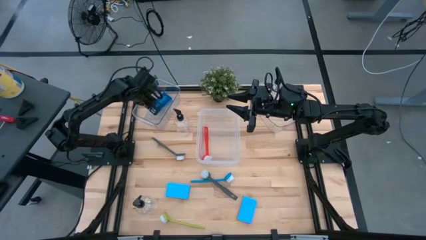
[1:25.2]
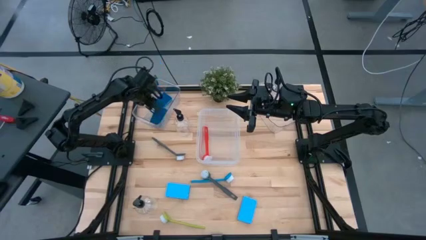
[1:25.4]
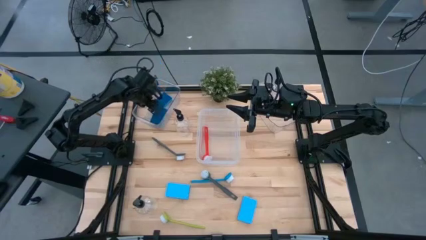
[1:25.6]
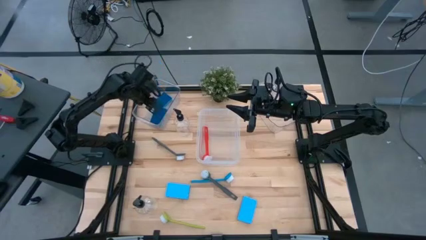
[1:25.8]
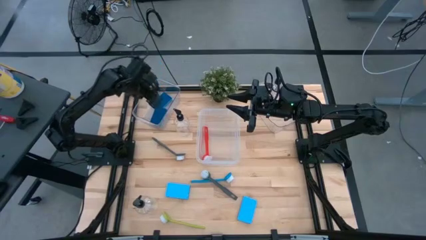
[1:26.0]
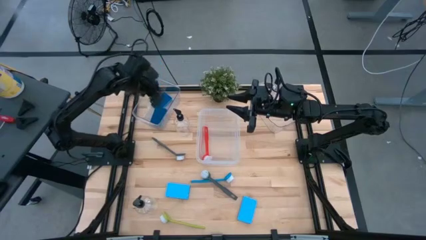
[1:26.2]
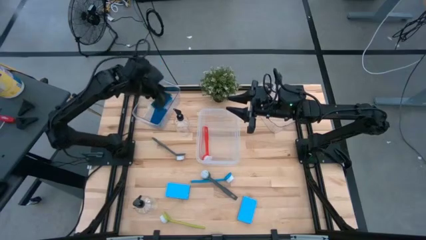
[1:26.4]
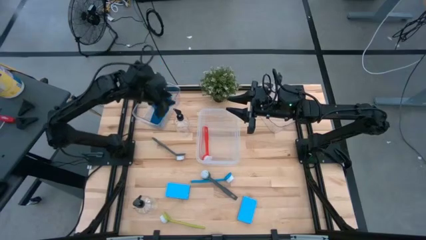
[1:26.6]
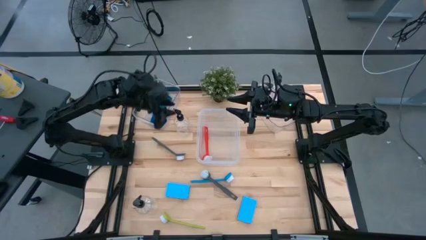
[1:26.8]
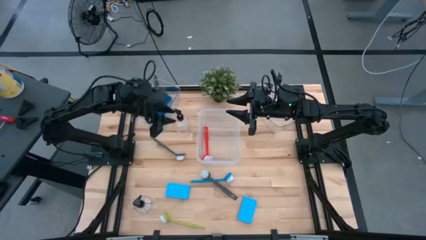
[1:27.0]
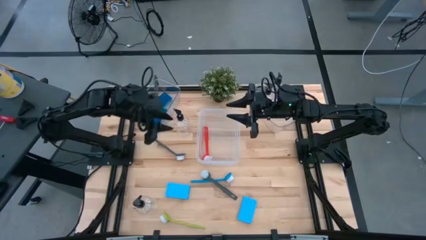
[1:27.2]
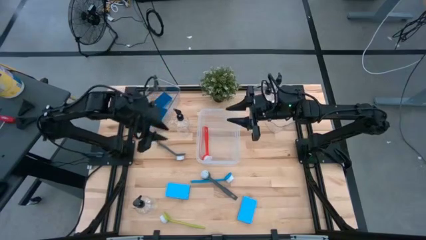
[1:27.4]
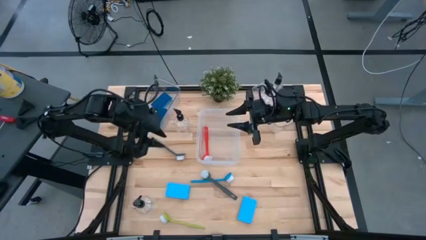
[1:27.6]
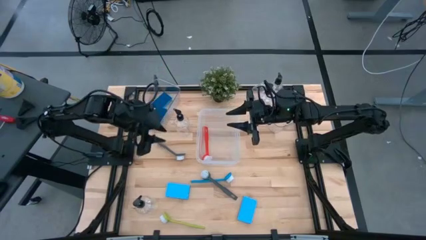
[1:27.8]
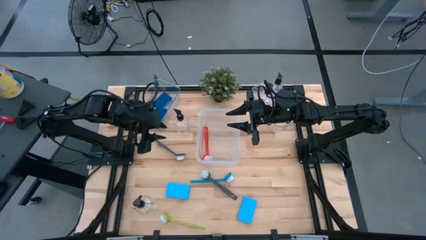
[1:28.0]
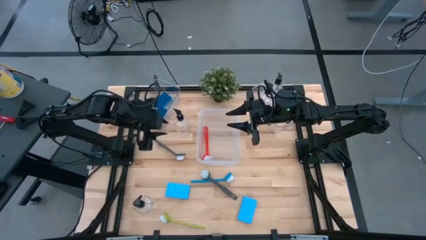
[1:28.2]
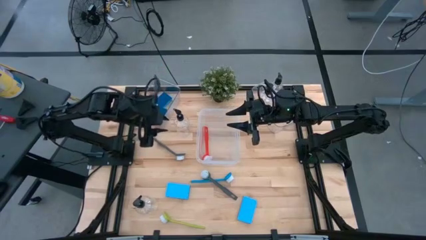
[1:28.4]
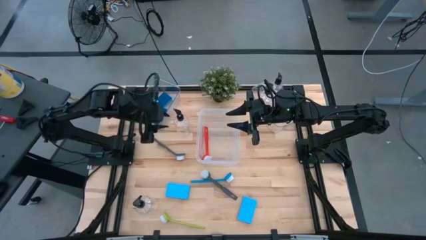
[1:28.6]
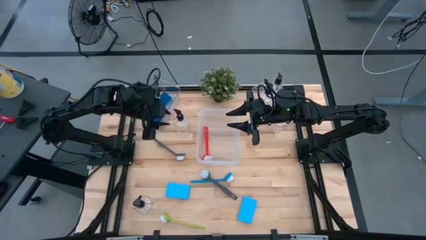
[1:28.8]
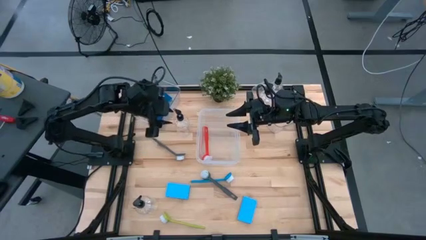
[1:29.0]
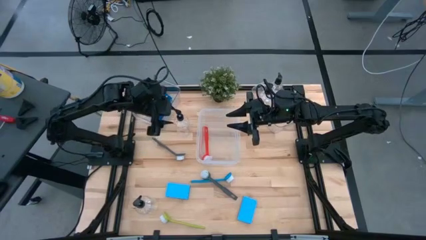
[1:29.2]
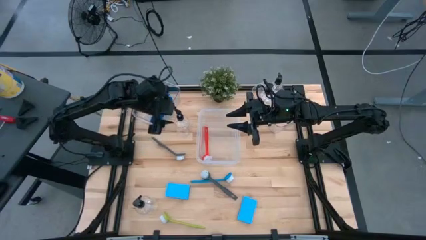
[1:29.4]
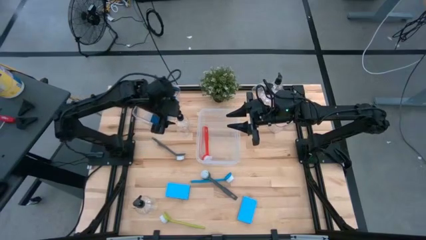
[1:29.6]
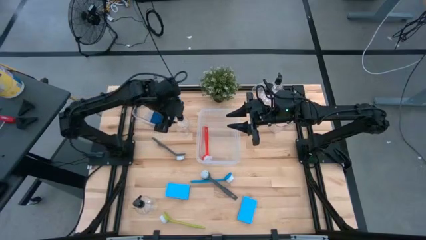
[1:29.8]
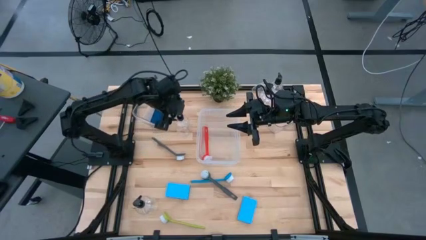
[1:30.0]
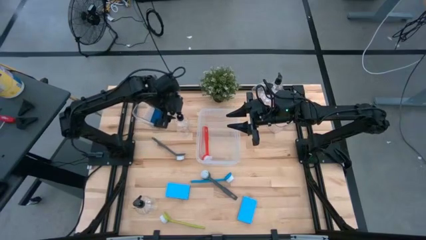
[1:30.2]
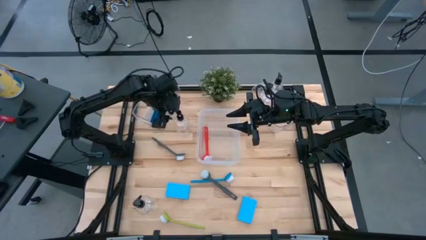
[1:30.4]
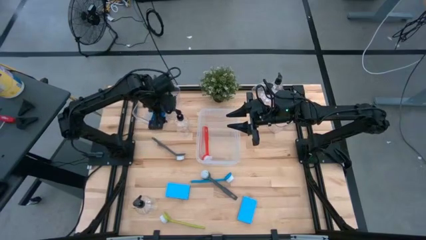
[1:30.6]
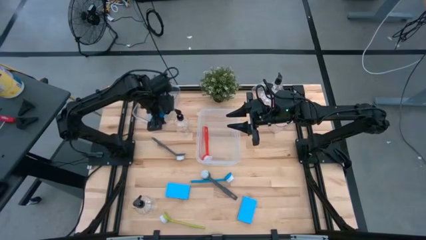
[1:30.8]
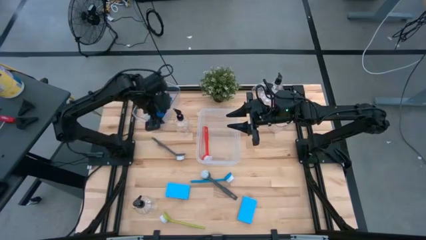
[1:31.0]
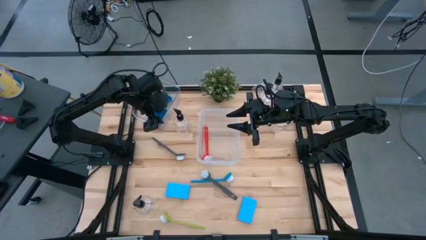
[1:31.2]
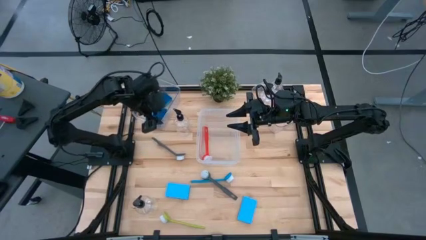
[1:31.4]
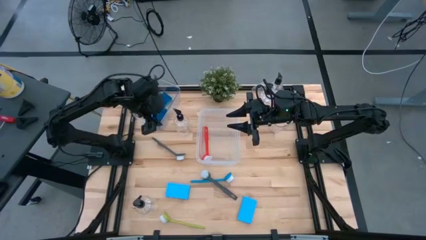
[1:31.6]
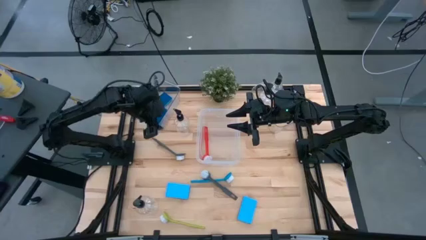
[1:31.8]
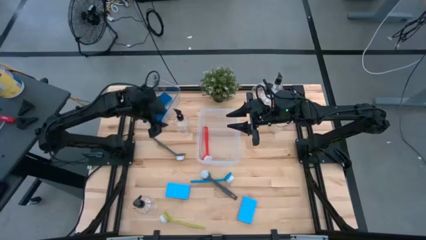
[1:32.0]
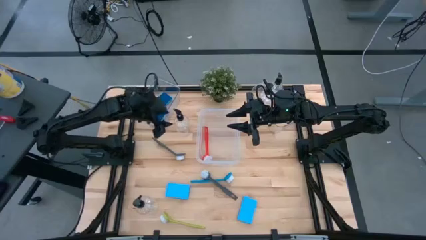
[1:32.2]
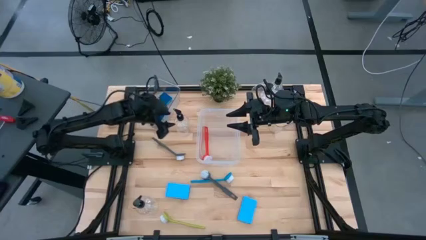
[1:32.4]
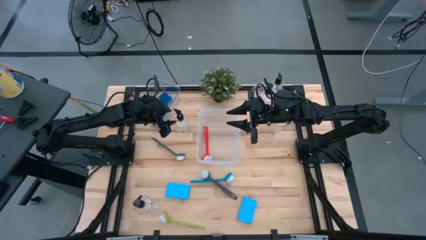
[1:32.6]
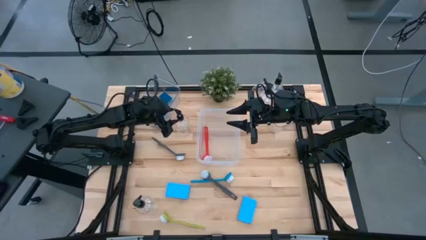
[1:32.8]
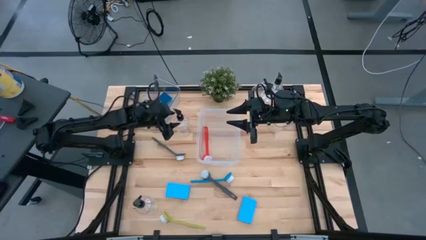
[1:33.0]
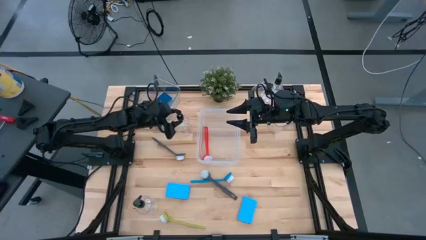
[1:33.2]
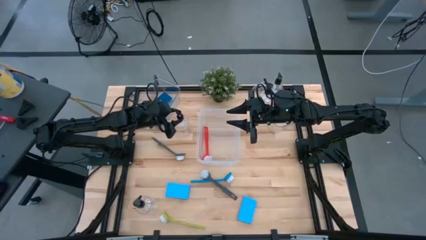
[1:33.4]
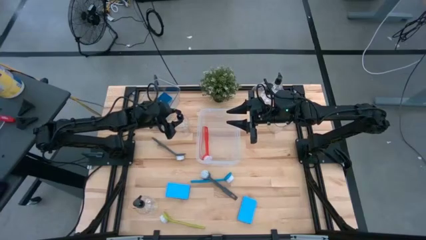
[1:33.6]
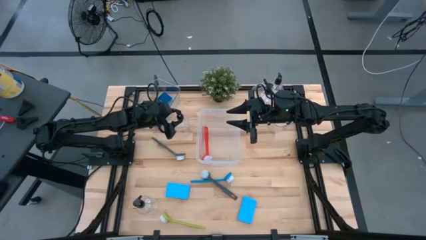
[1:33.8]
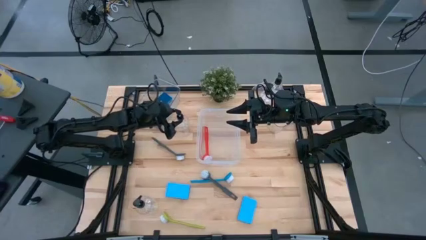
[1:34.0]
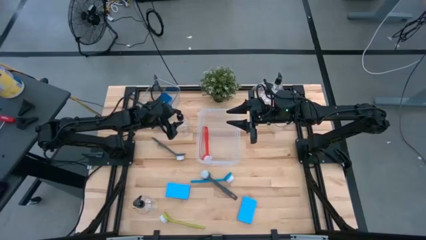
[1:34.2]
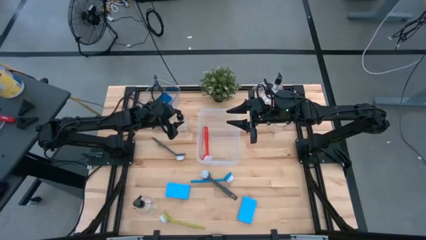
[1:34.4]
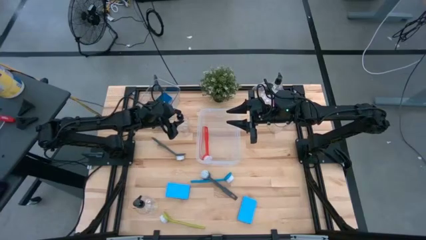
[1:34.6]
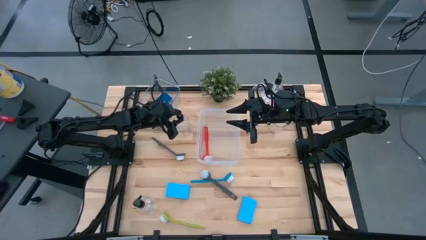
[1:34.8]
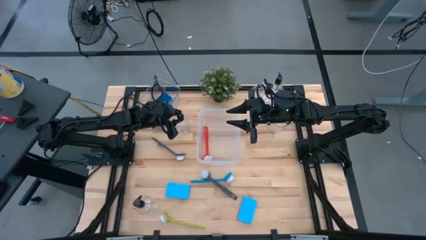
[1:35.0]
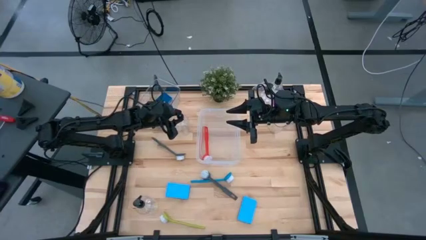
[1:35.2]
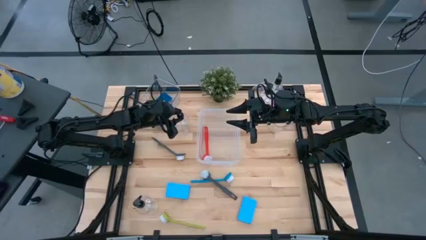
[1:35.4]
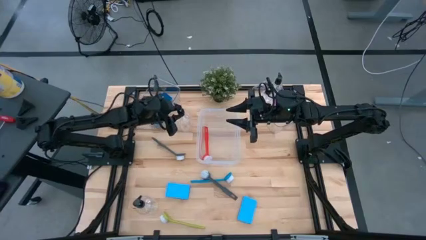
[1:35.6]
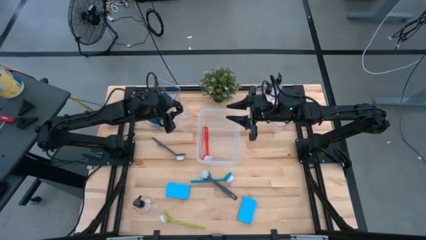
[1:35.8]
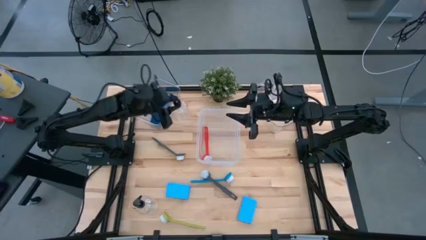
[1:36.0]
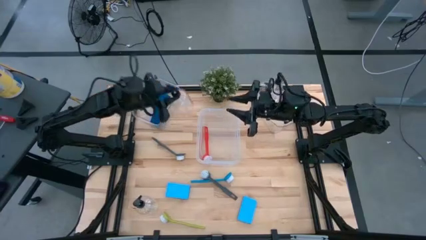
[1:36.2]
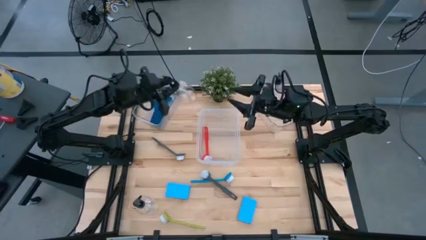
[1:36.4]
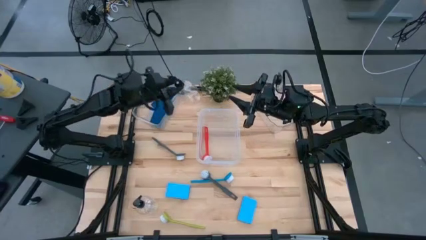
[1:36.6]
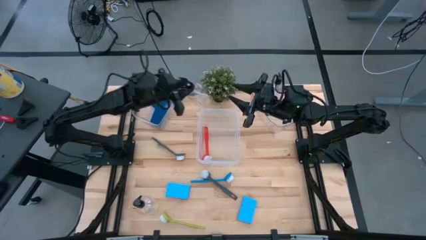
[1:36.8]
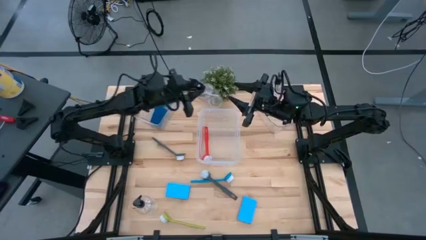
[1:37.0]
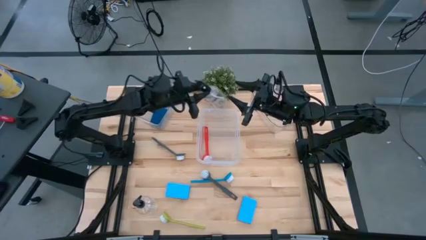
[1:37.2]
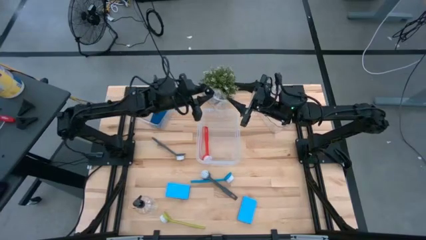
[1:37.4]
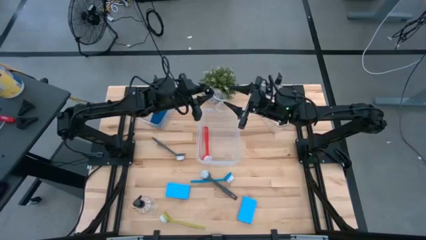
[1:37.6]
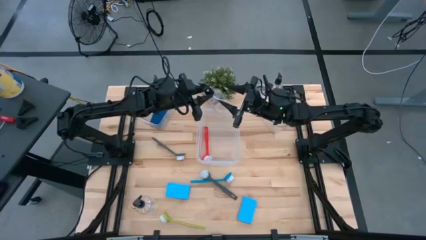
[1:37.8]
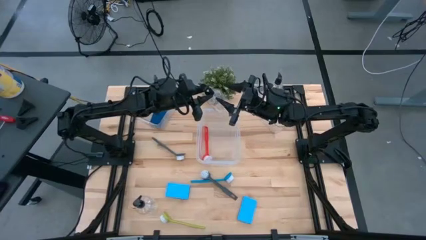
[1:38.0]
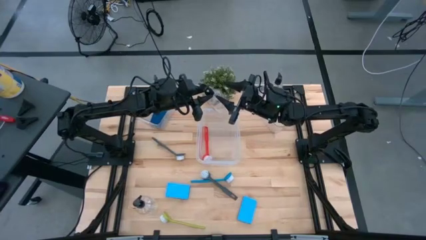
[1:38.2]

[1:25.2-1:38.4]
Task: Pick & Place Kitchen Sink Supplies
Put the black soap dispenser into the right transparent bin
